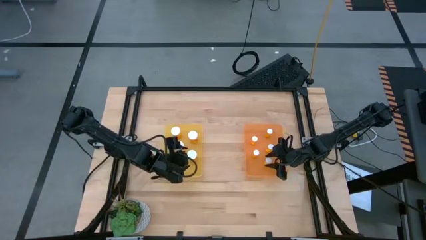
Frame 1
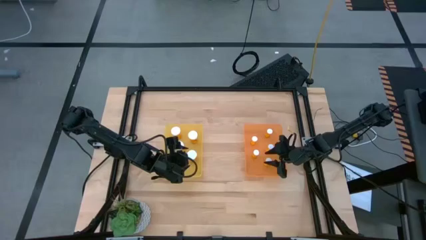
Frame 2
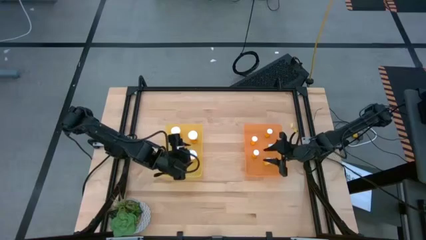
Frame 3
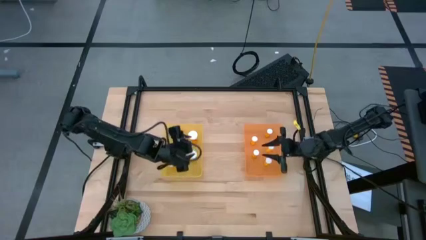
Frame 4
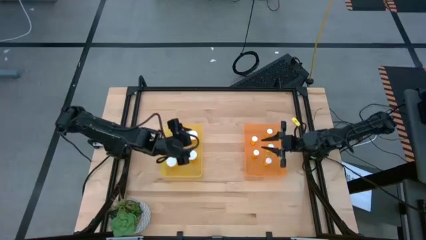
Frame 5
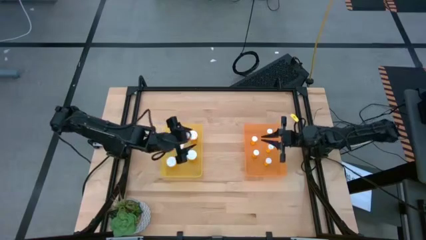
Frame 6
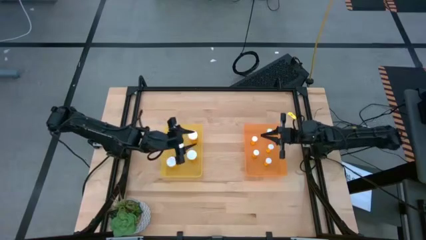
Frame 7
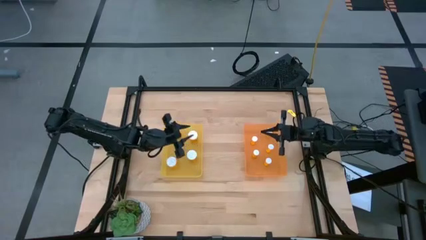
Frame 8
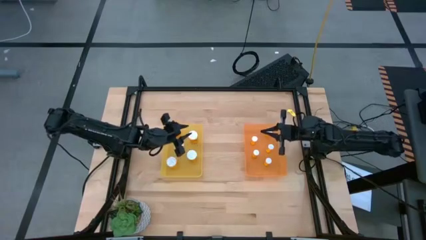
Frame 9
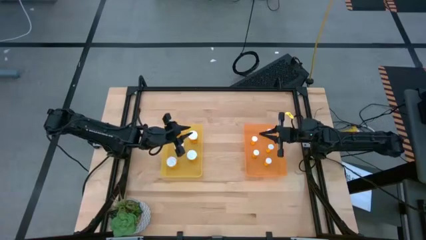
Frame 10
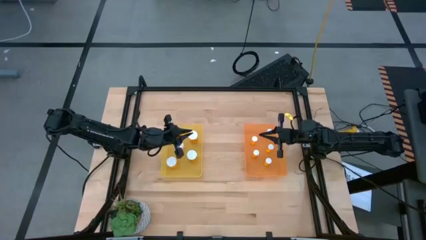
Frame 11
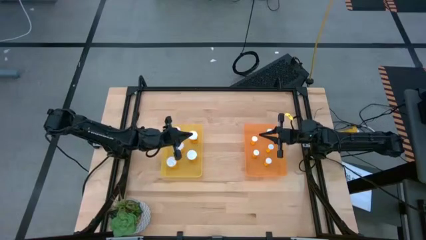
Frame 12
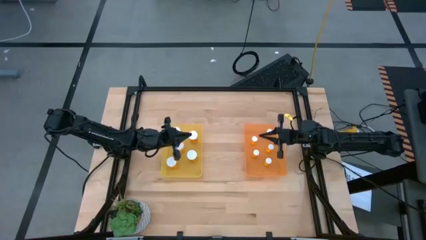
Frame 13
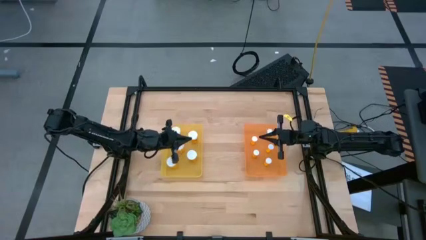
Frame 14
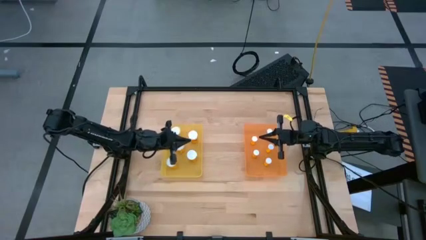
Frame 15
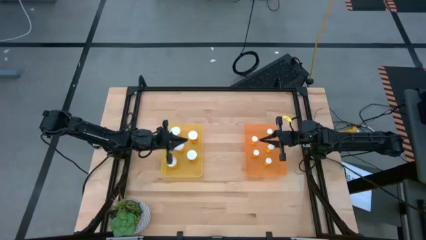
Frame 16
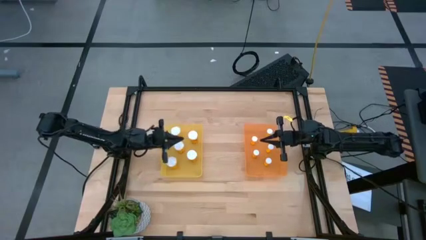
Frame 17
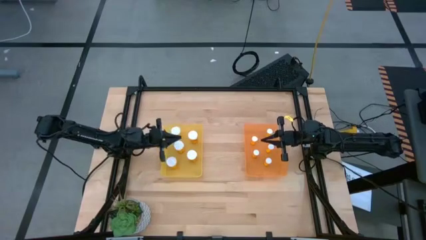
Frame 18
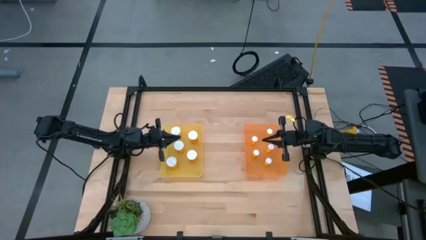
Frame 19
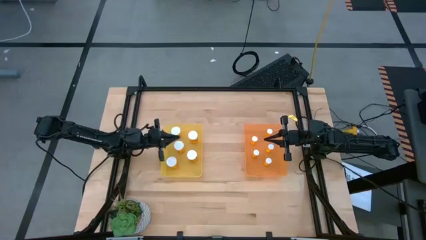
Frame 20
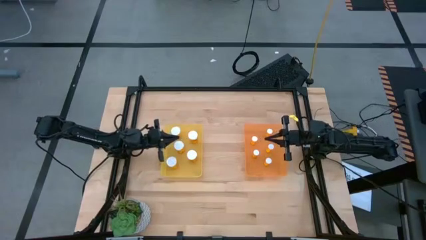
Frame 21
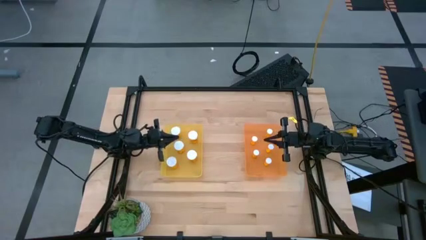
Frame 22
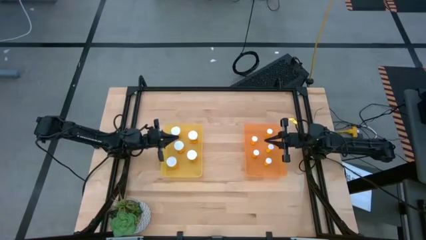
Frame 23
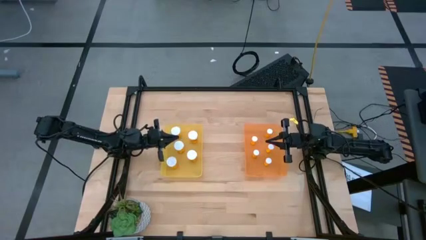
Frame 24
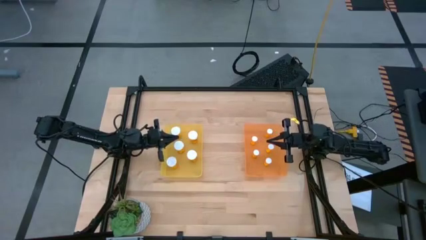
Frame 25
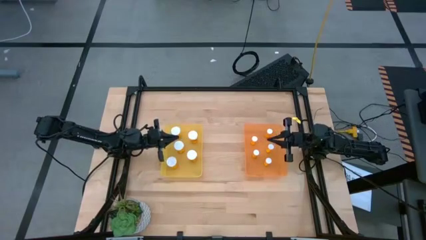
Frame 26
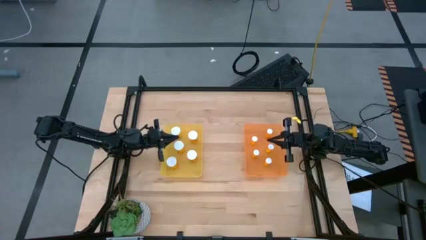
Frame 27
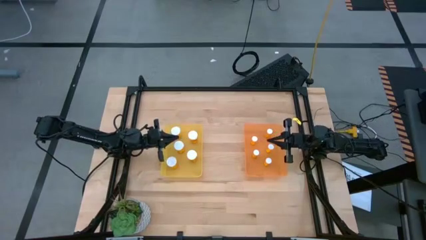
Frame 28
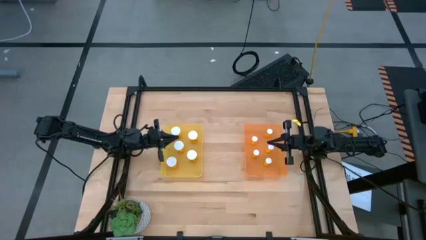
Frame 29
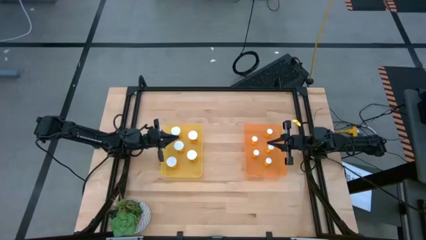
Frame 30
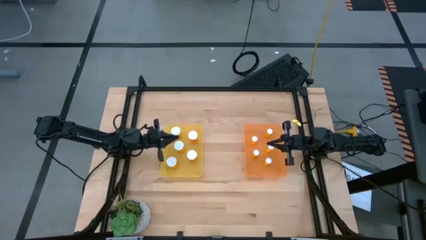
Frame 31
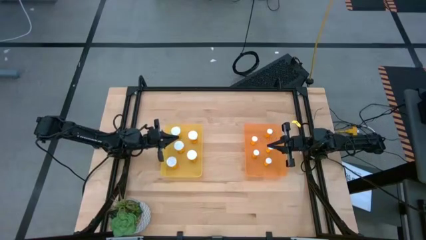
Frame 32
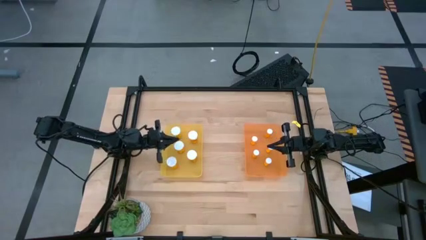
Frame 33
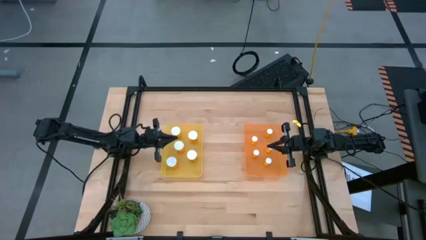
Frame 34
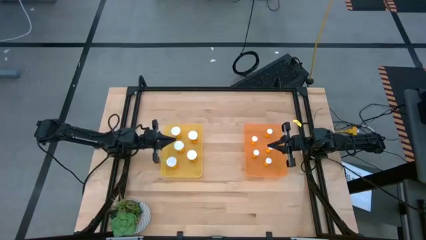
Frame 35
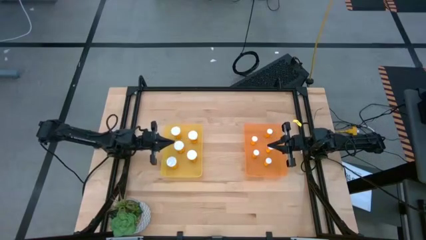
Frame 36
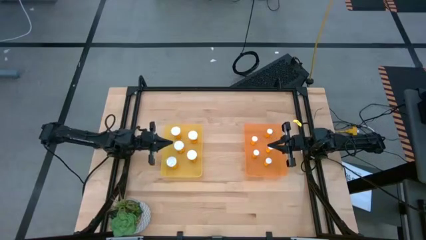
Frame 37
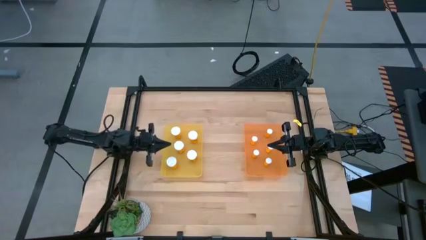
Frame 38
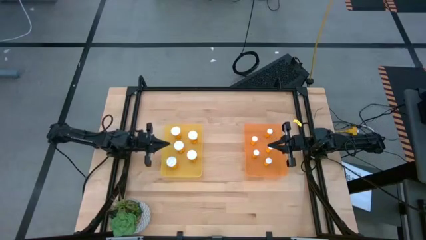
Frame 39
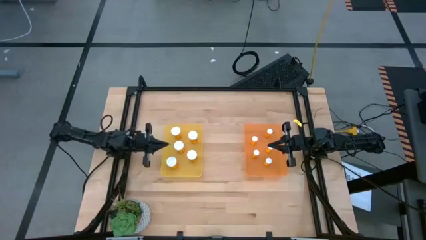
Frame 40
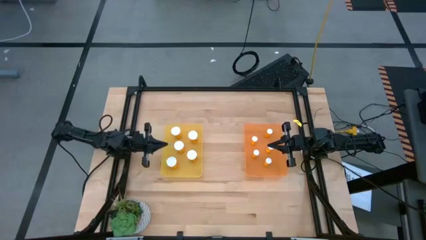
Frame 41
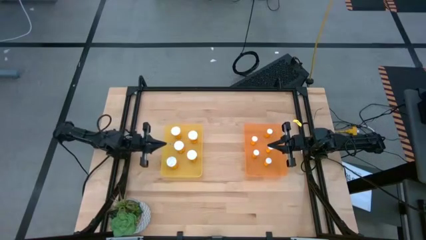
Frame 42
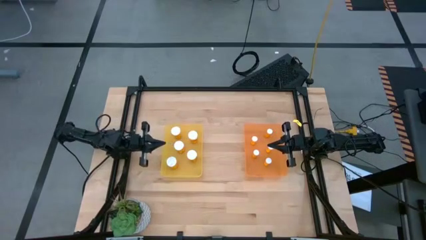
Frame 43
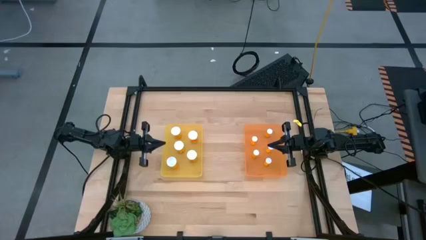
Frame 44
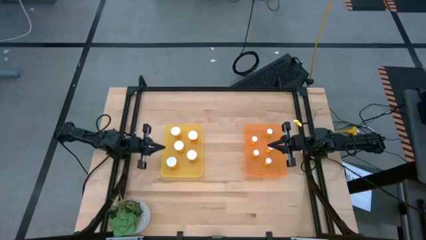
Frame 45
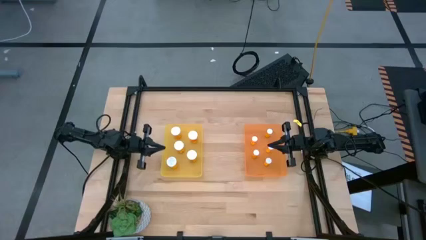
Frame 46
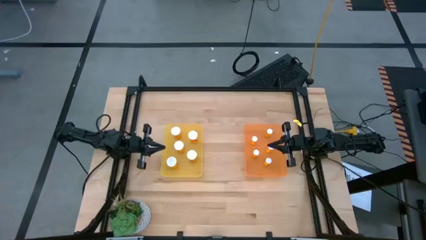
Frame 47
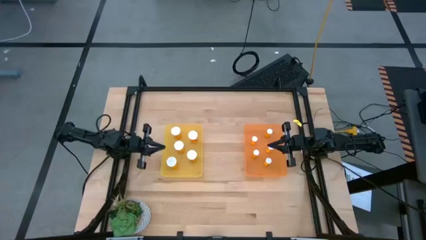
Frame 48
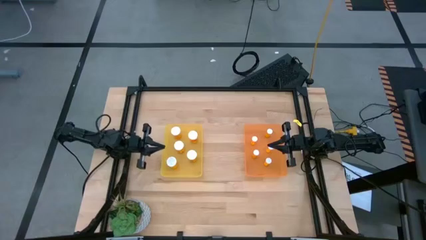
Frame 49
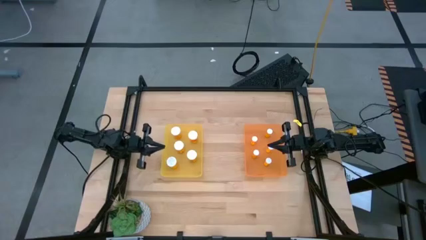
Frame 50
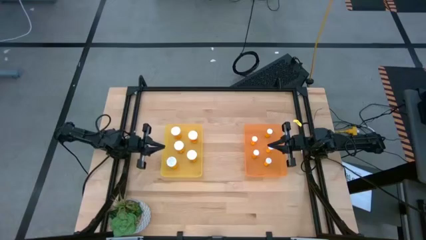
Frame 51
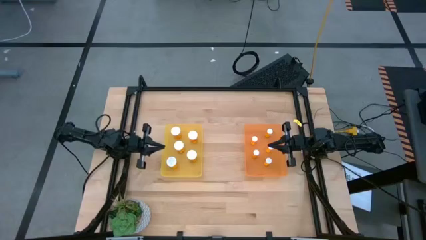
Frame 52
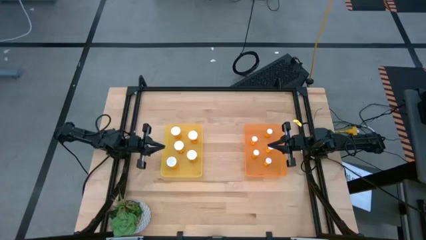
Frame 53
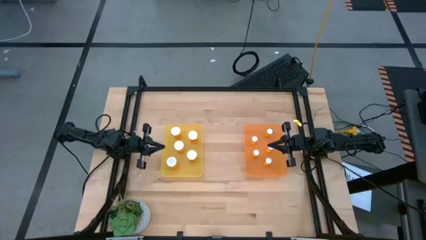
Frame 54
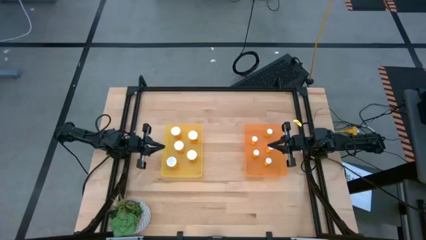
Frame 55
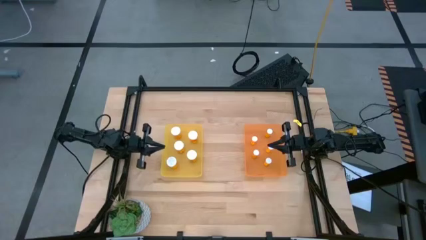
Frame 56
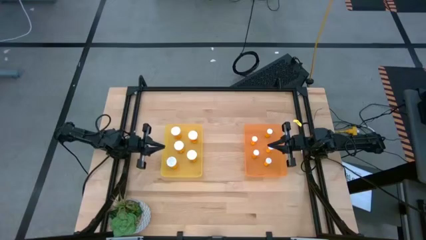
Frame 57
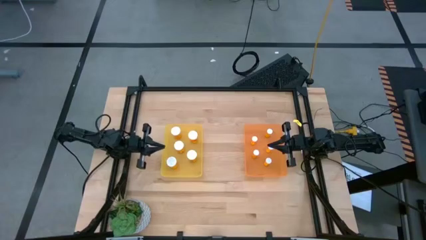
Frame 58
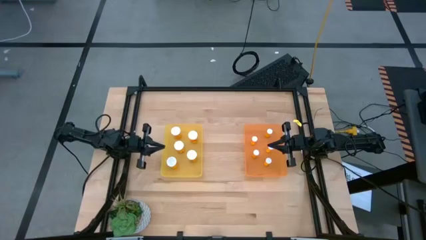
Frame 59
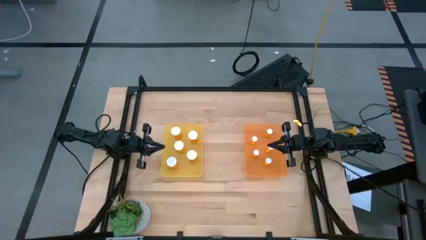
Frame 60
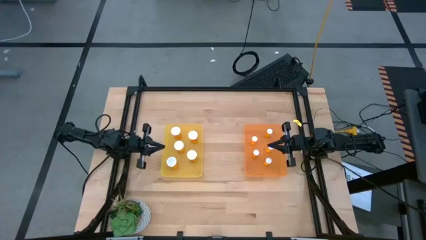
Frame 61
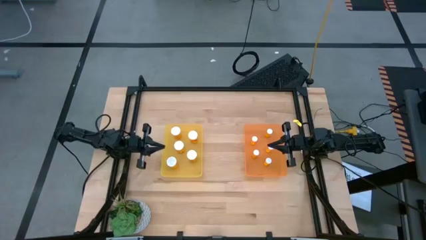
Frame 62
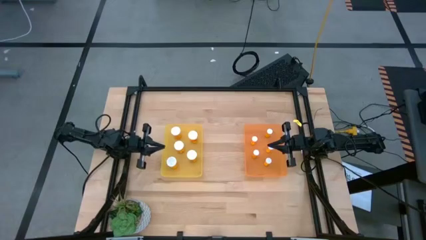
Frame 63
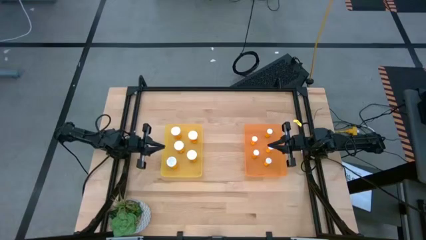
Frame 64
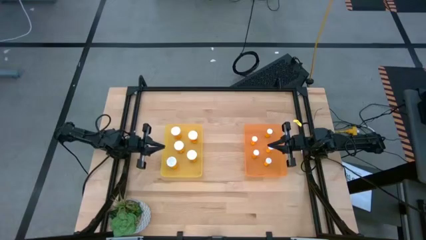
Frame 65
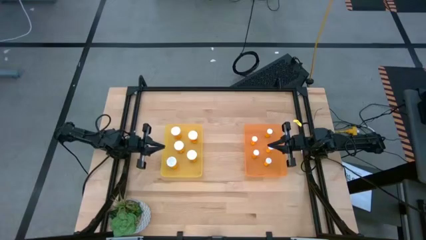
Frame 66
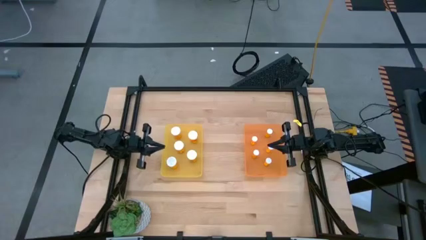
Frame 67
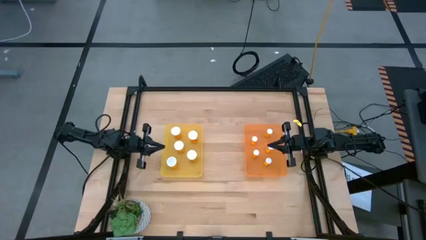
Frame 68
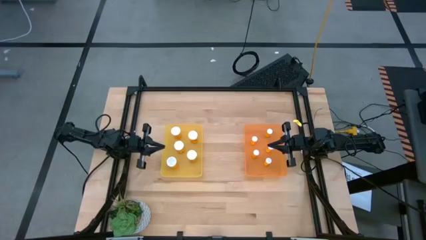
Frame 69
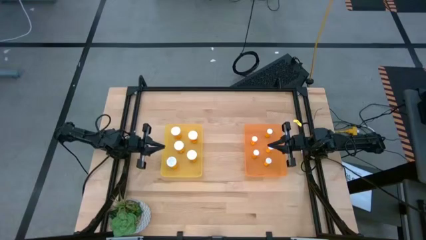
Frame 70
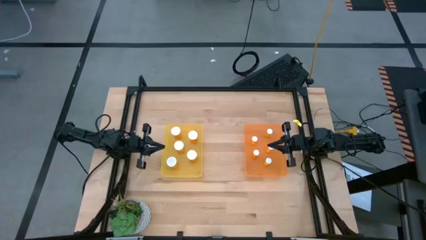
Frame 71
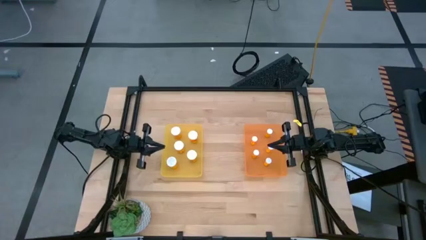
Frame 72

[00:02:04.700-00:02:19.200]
Task: Pick and place medicine bottles into bin by pill shape (circle, oval)
Return to Home Position
